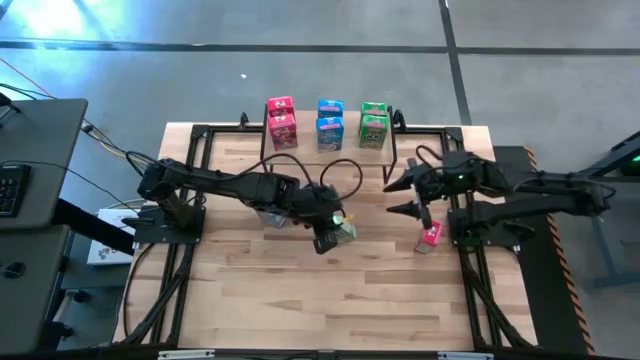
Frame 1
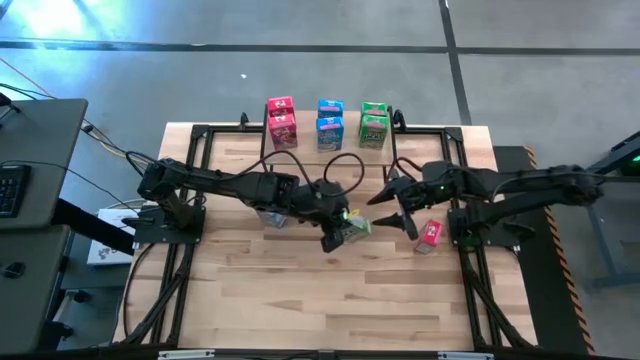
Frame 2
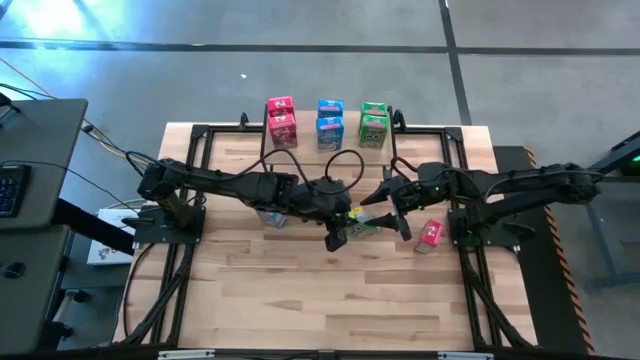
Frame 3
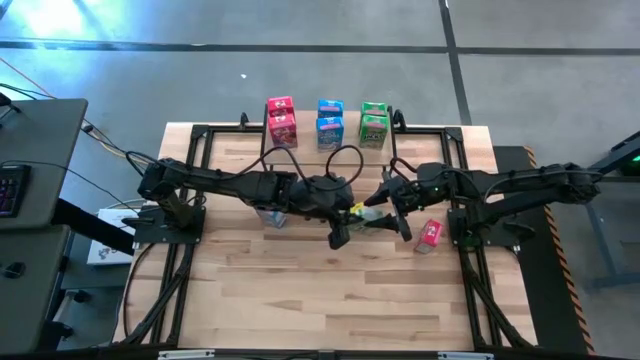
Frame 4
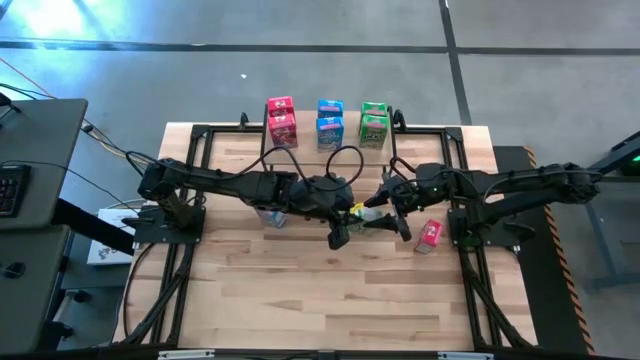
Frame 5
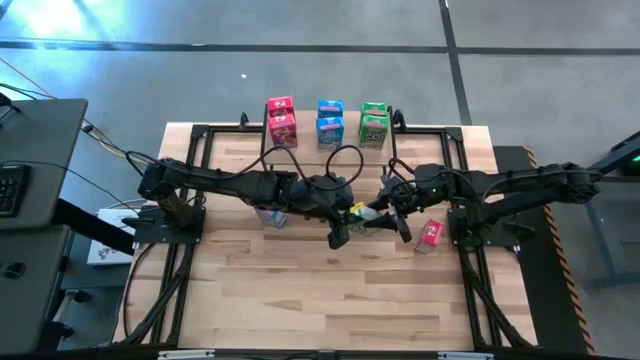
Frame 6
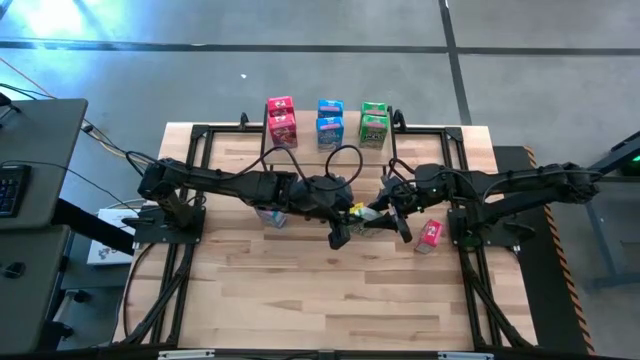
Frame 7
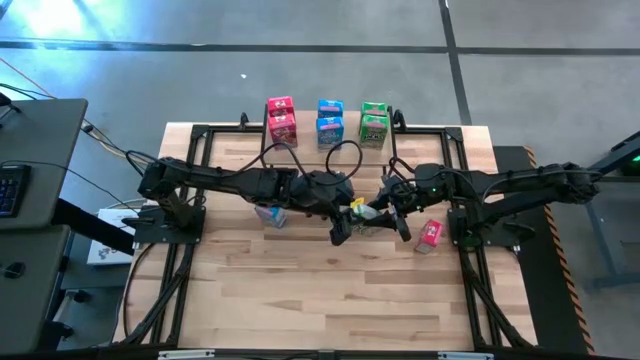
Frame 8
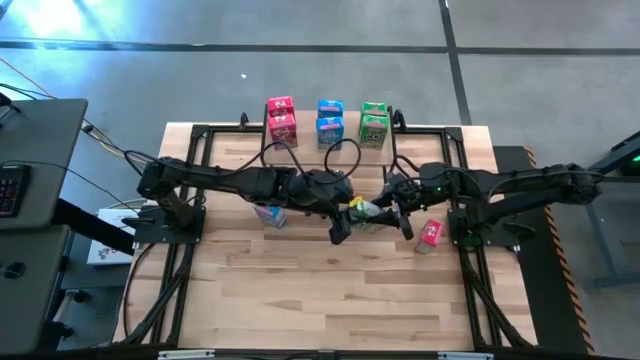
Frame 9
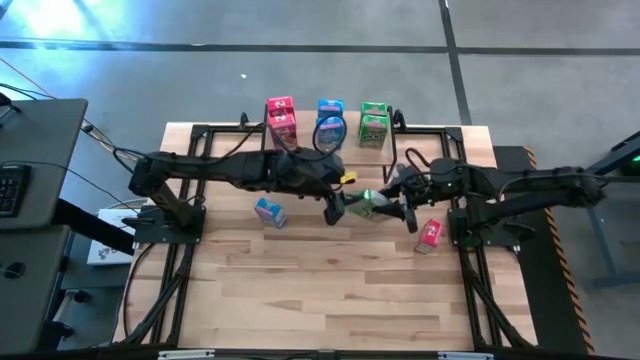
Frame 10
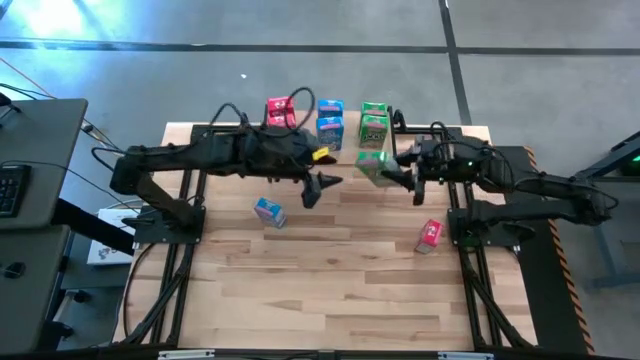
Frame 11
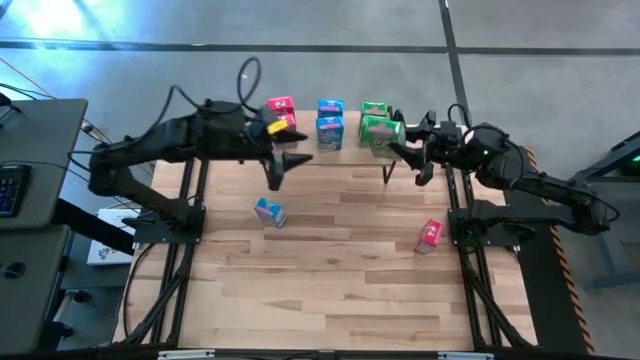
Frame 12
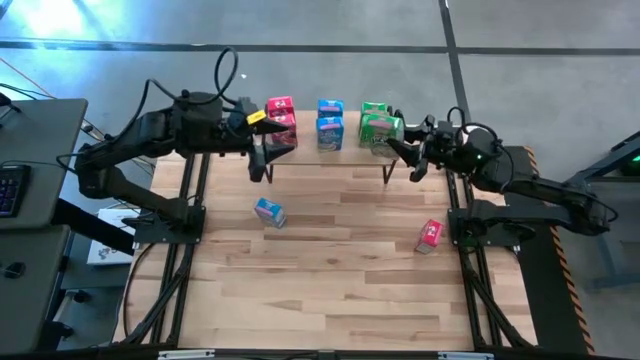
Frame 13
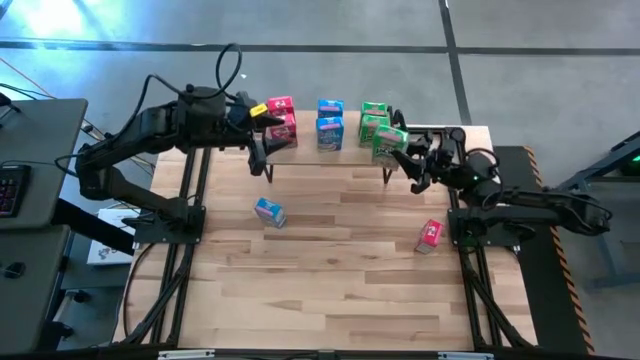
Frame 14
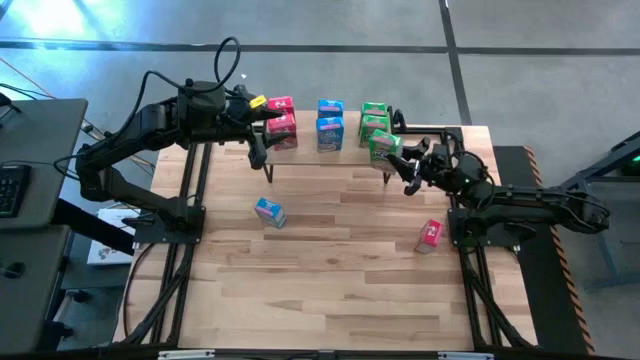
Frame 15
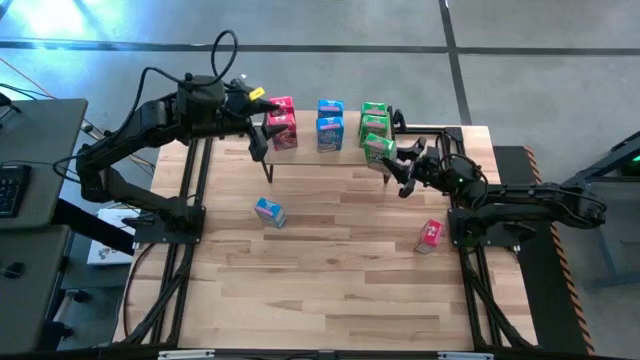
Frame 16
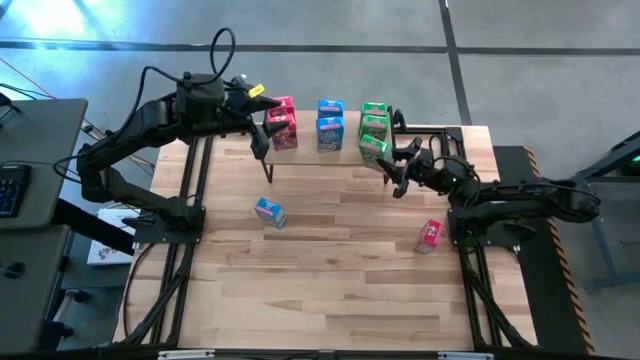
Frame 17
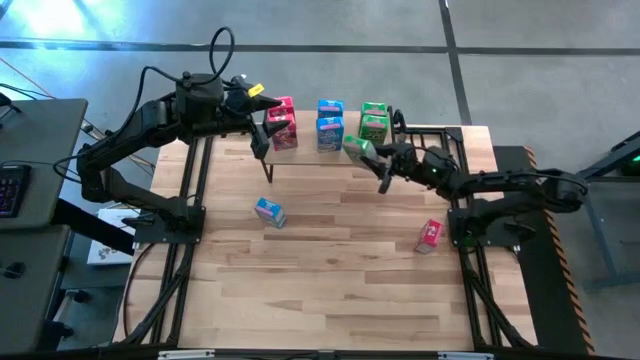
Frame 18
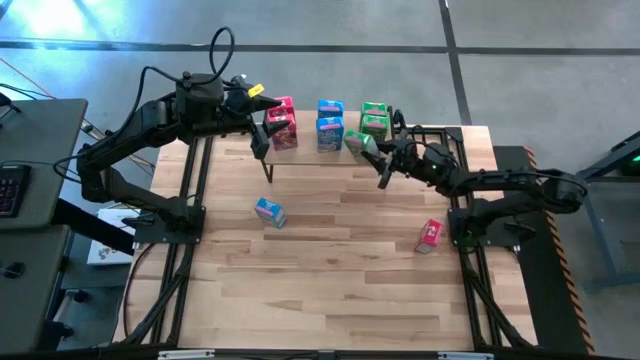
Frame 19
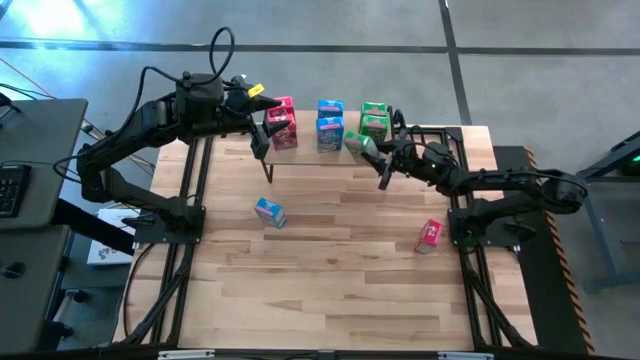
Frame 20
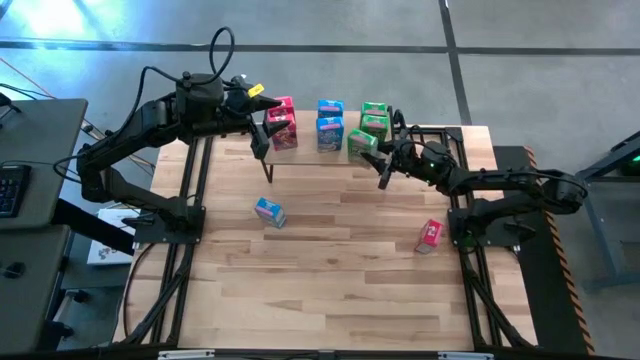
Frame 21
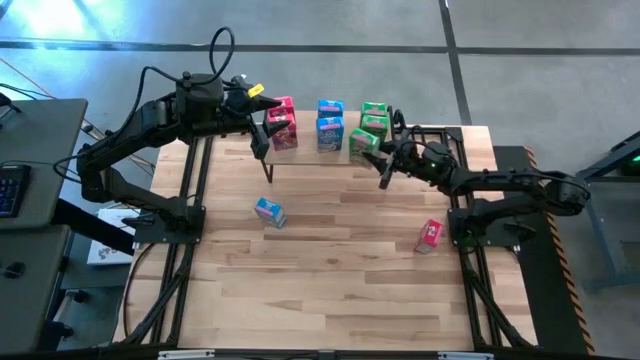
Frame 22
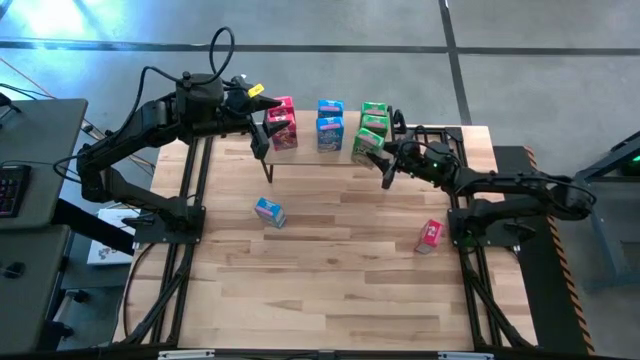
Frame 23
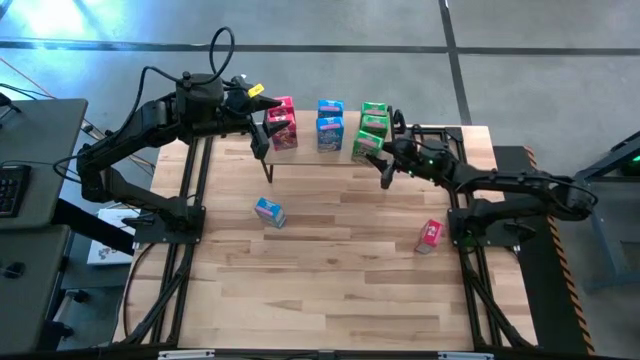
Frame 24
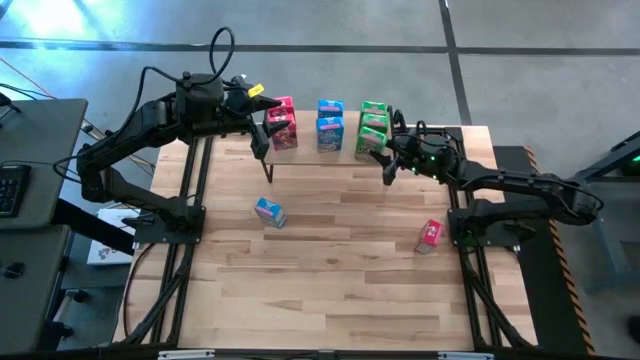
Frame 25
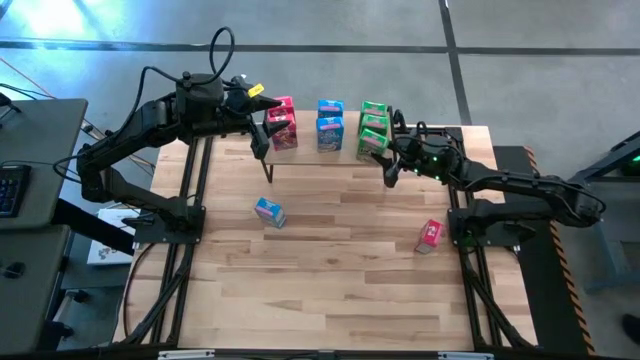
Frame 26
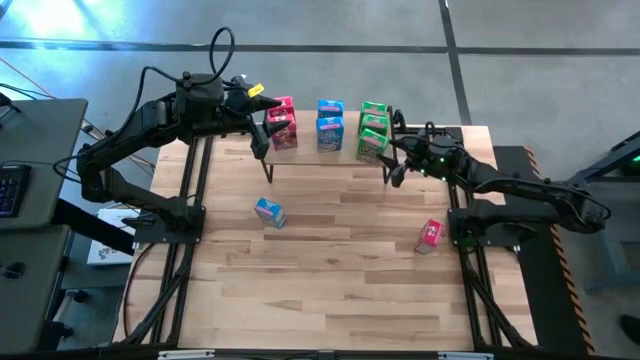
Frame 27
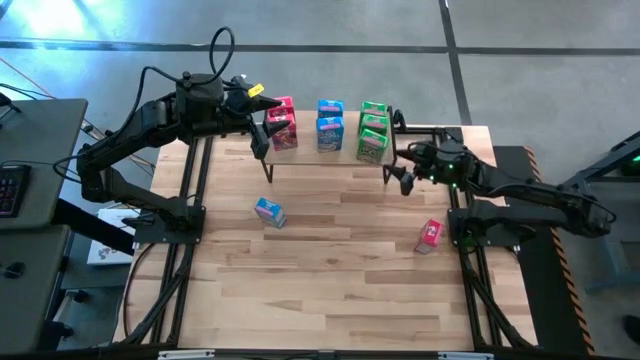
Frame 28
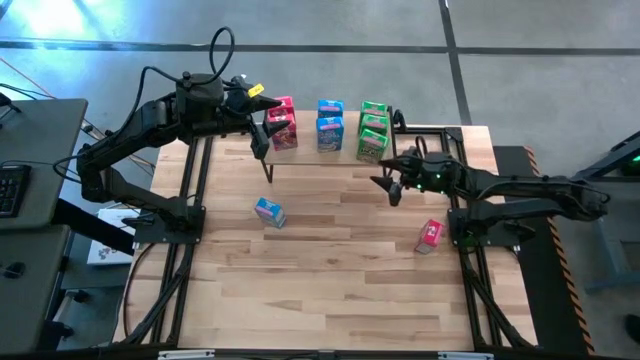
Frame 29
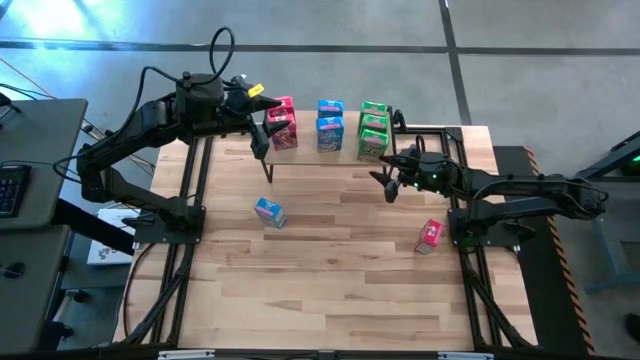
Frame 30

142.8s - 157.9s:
Task: Stack cereal on shelf
Put the green cereal box on the shelf aligned with the other green cereal boxes

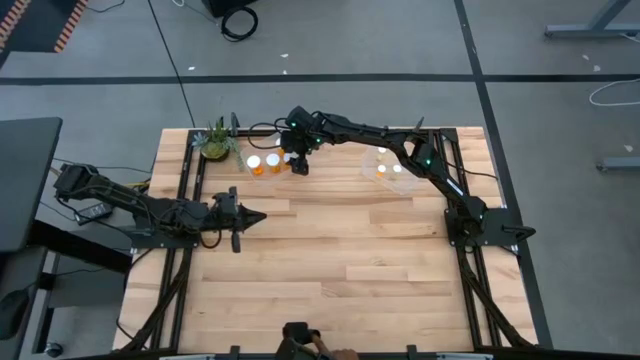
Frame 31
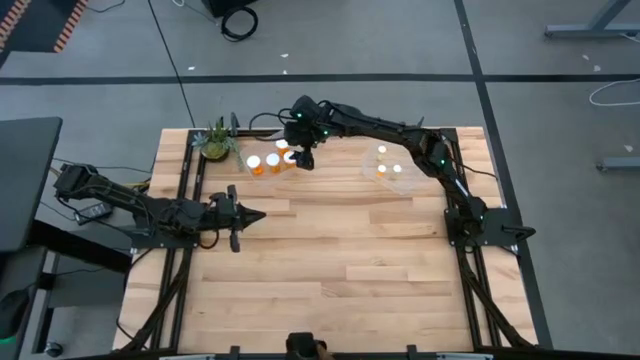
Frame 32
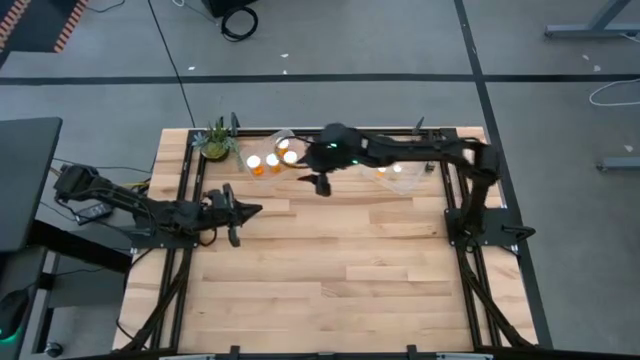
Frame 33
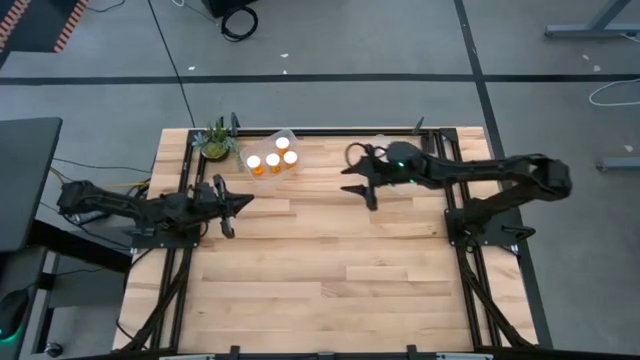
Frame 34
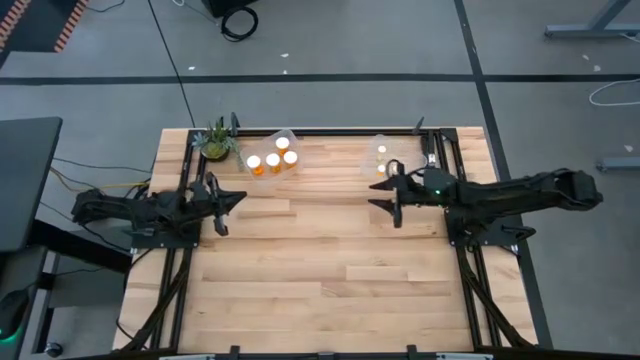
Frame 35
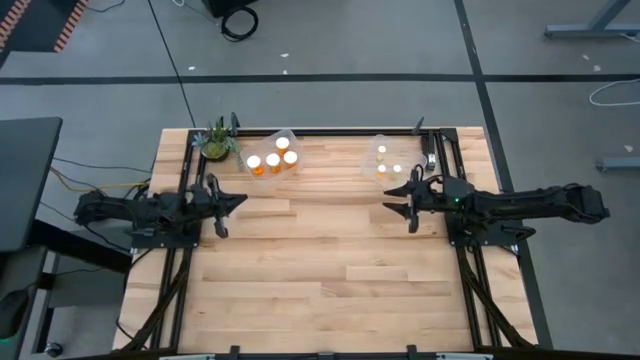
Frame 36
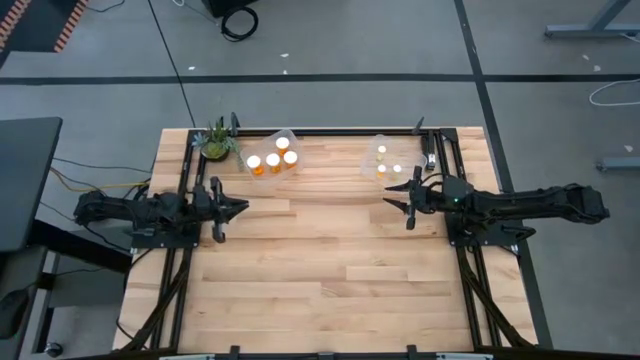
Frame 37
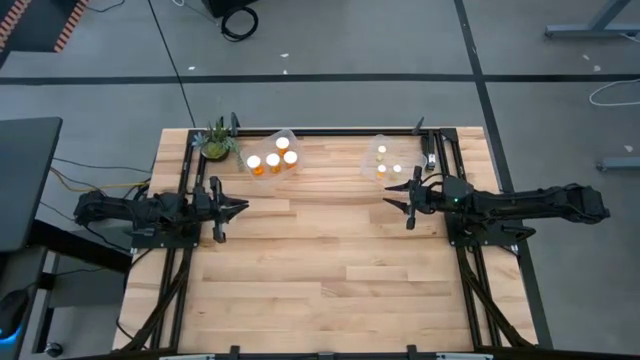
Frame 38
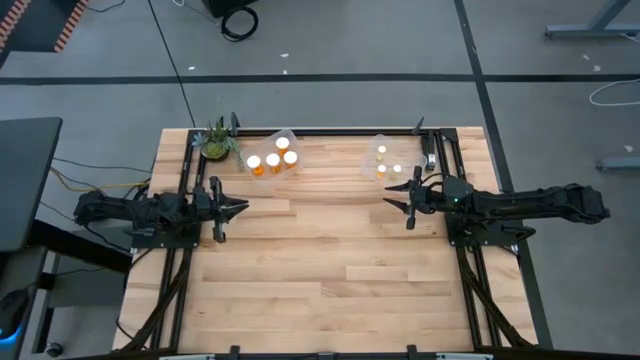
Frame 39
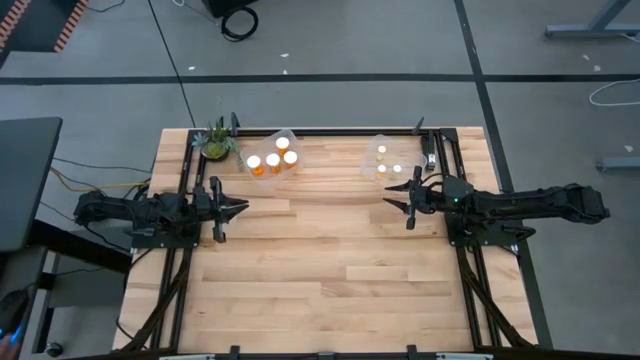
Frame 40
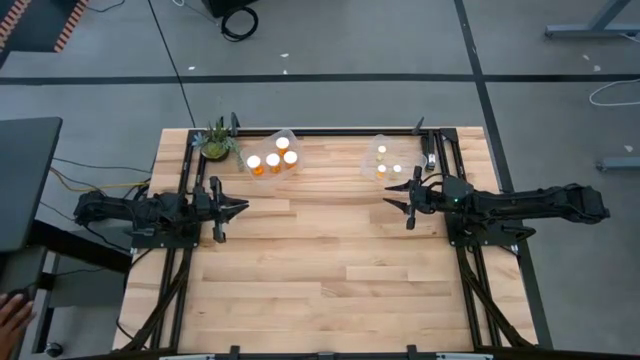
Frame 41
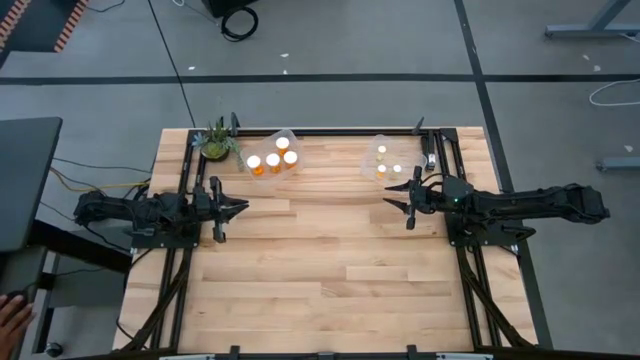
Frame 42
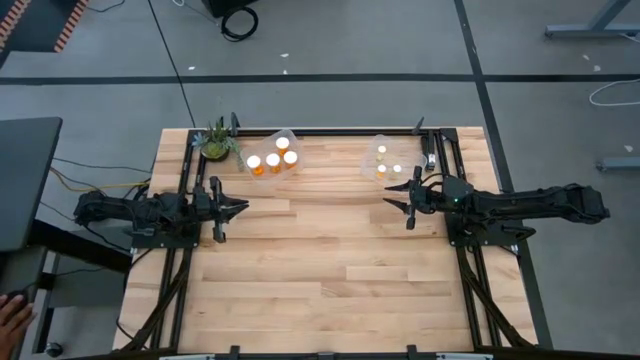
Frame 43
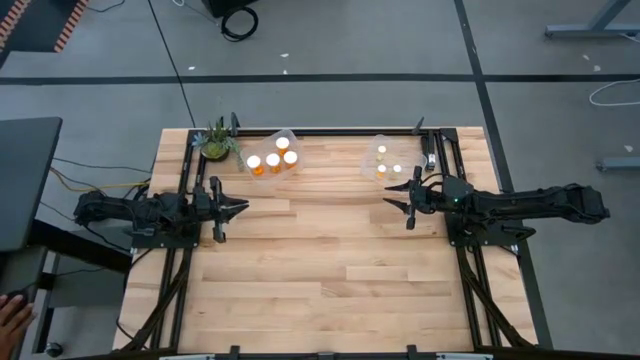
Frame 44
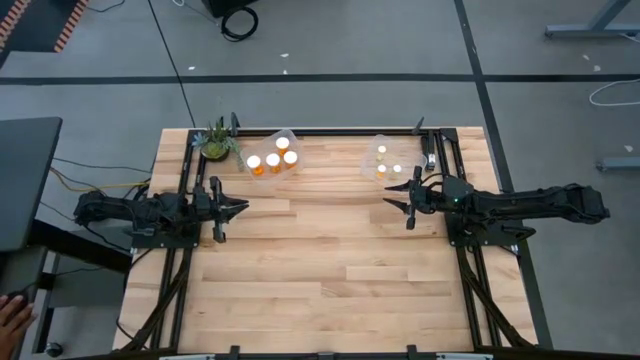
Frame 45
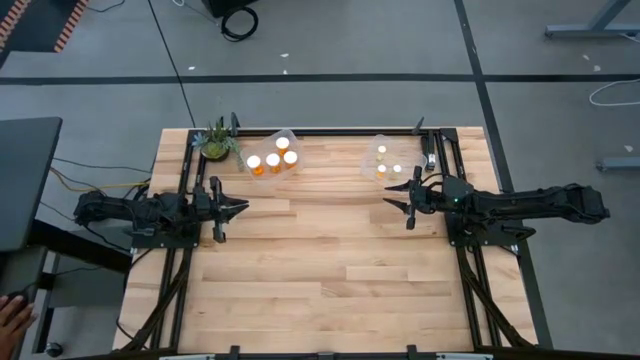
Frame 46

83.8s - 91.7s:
Task: Pick and place medicine bottles into bin by pill shape (circle, oval)
Return to Home Position
